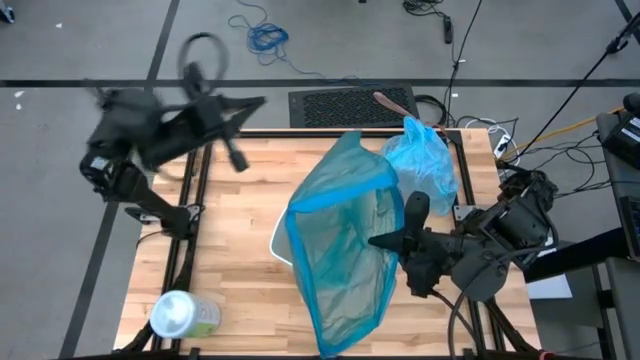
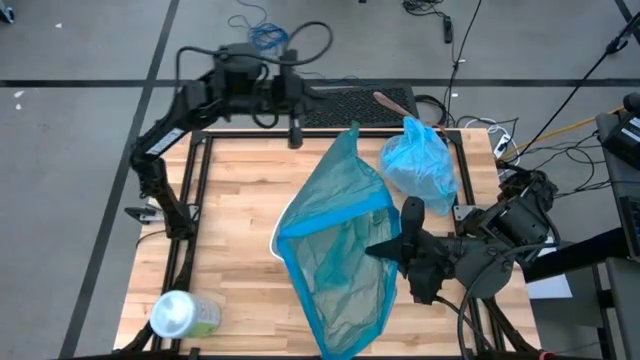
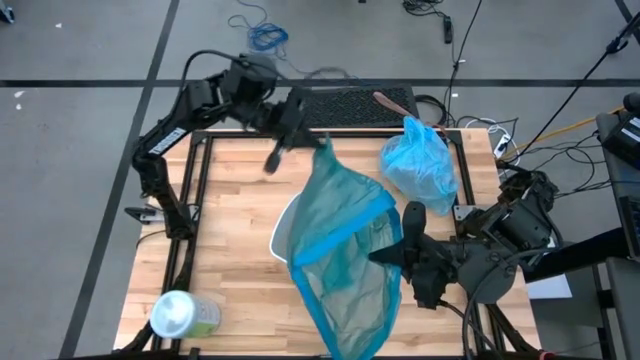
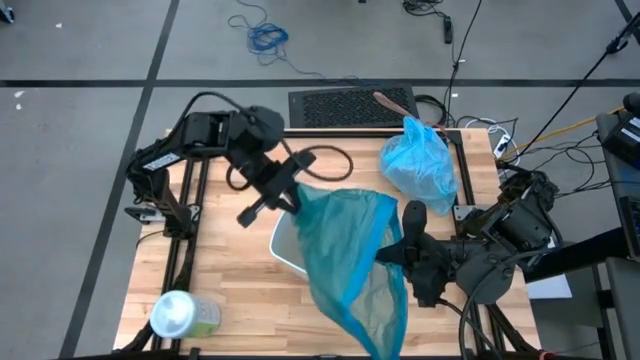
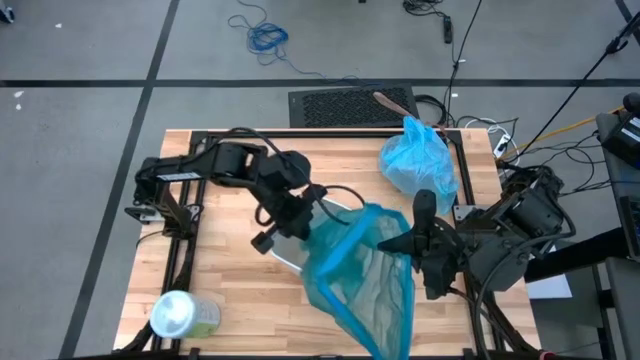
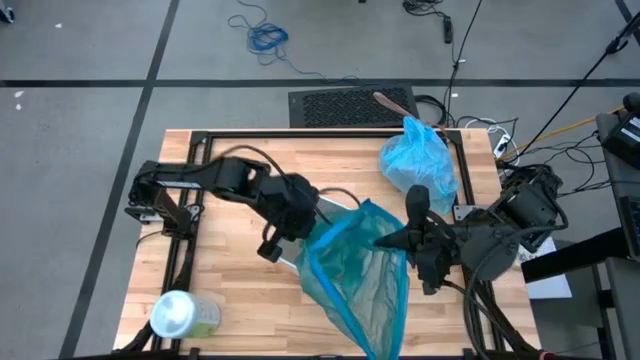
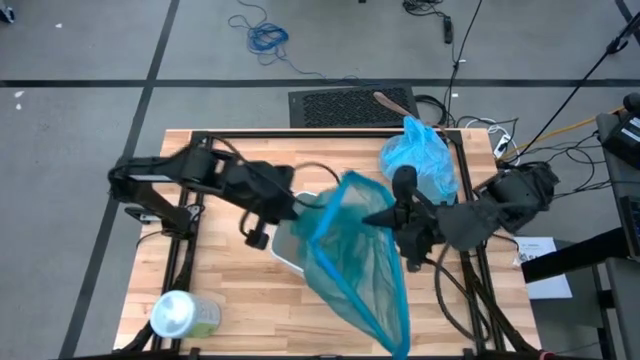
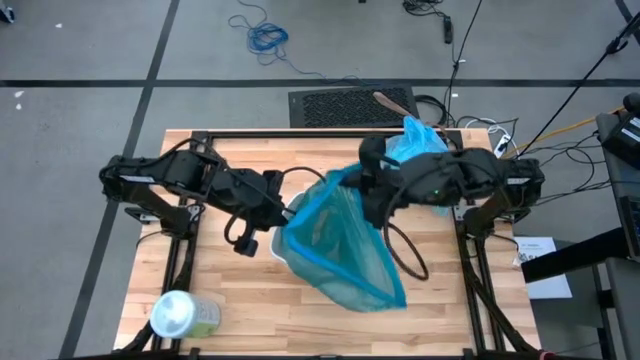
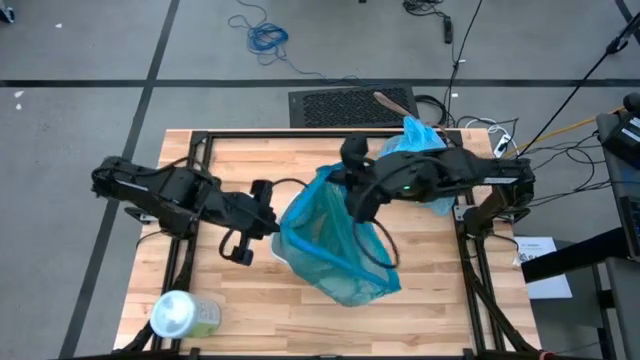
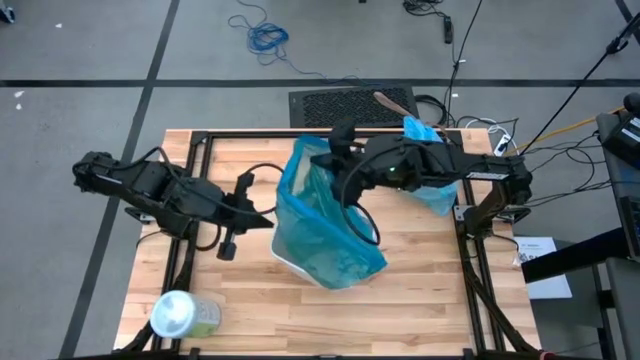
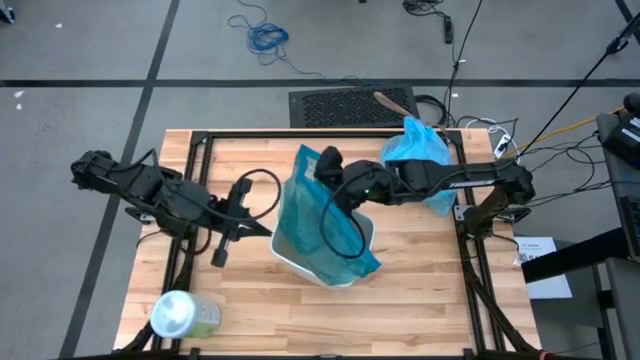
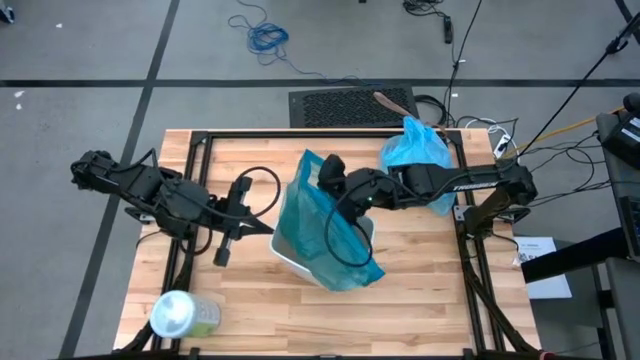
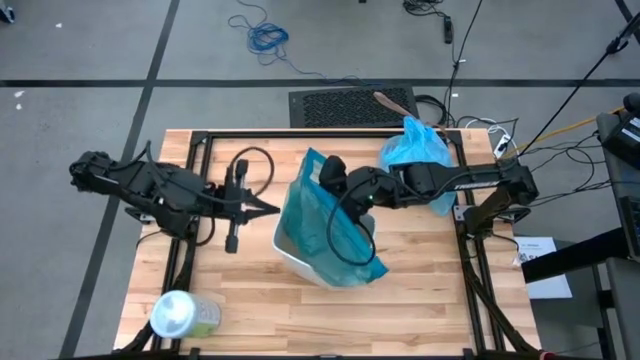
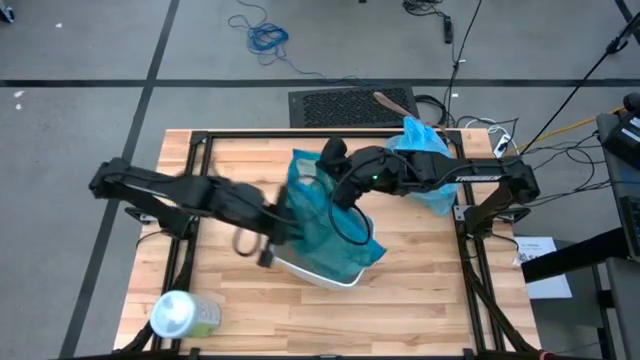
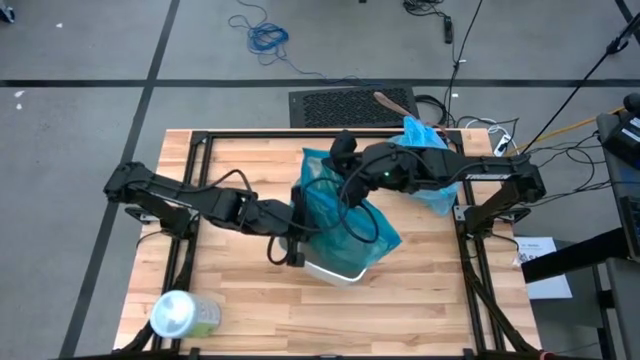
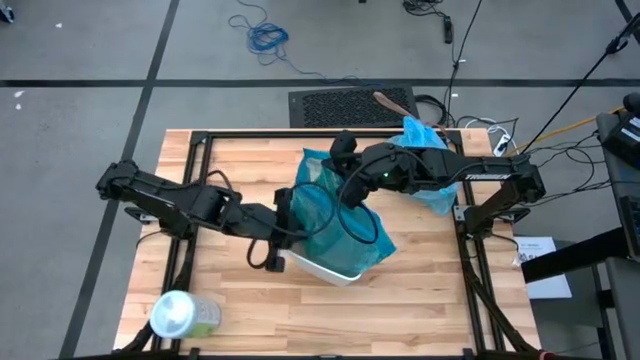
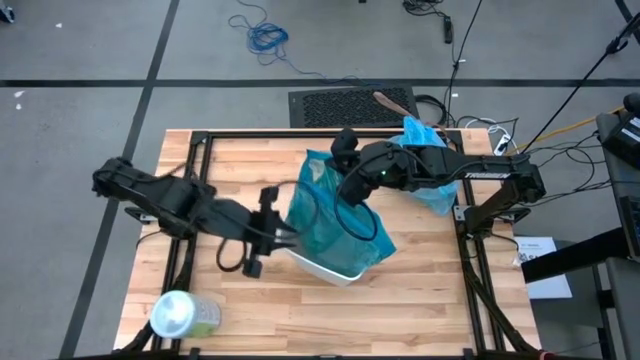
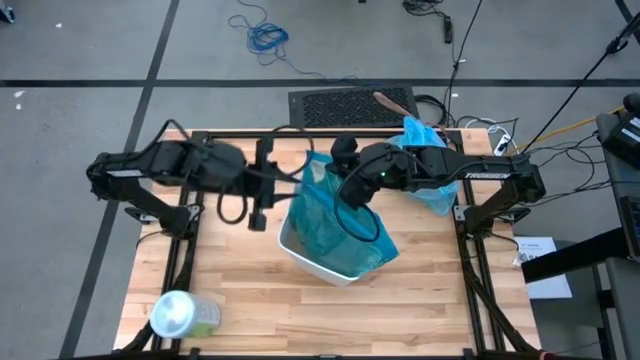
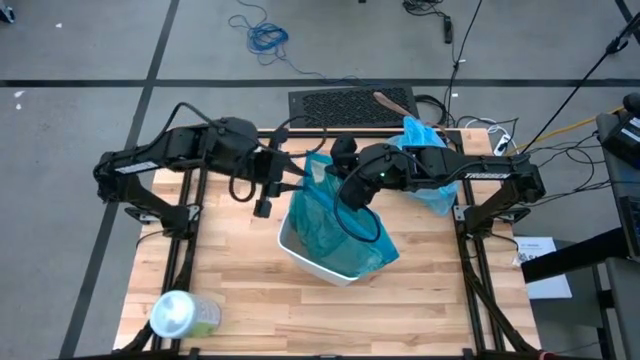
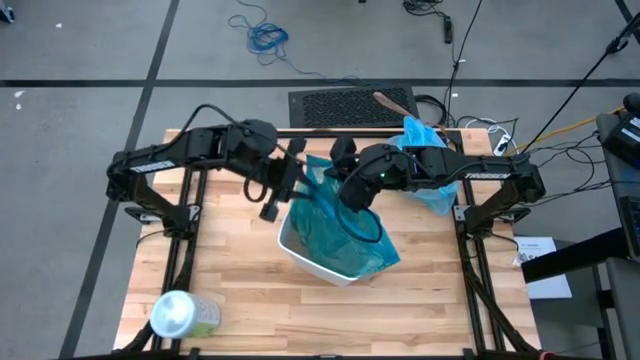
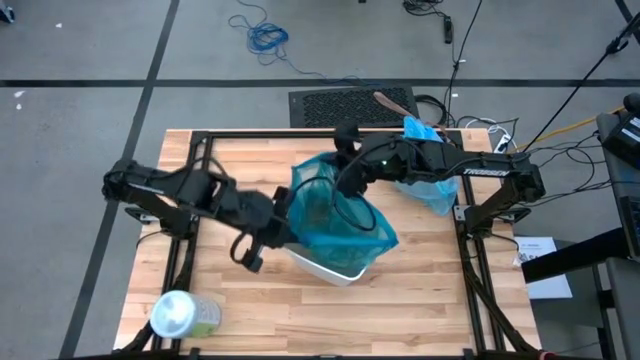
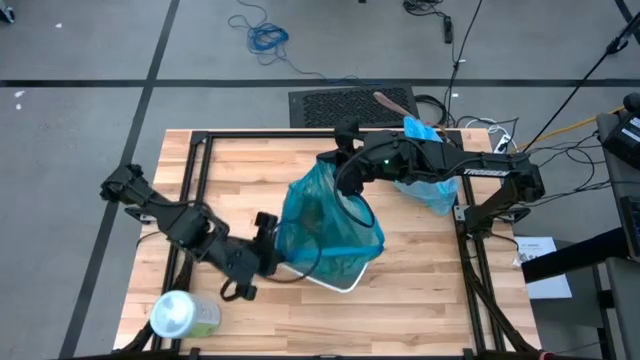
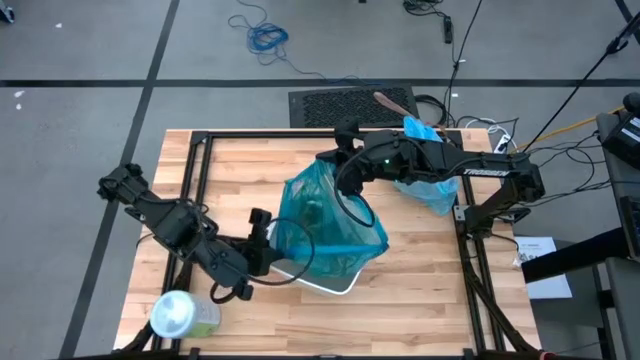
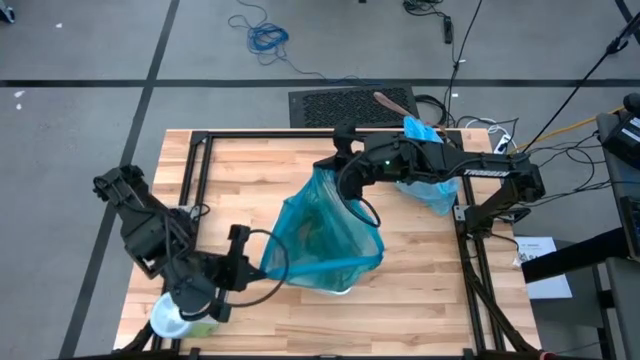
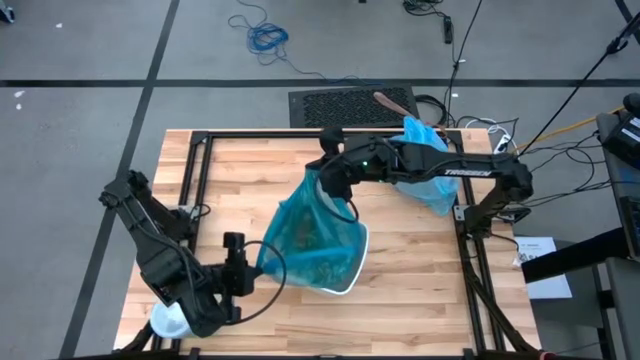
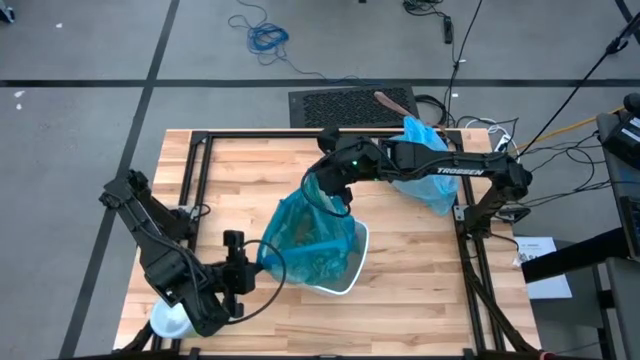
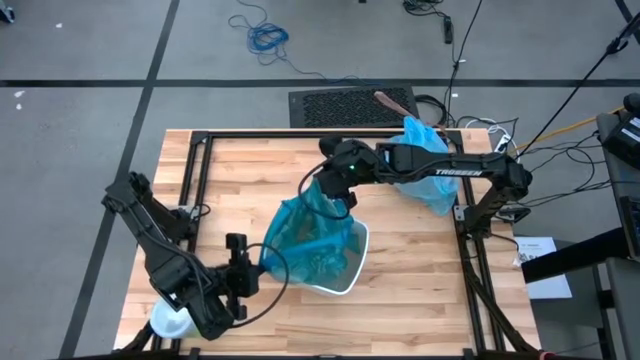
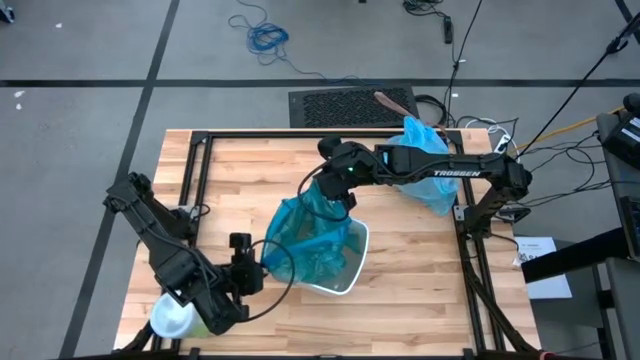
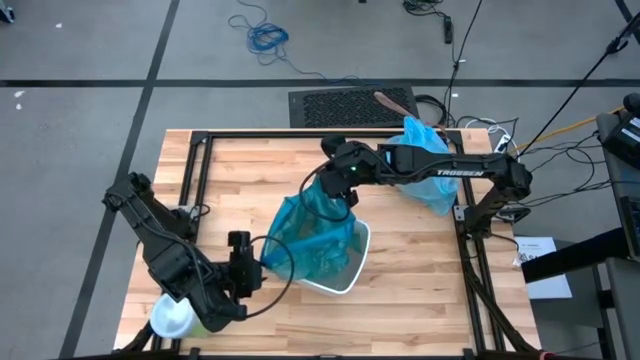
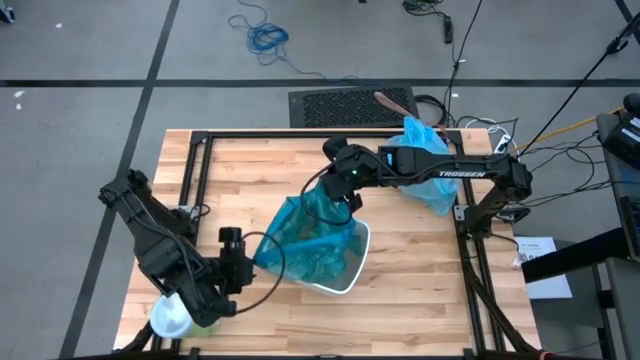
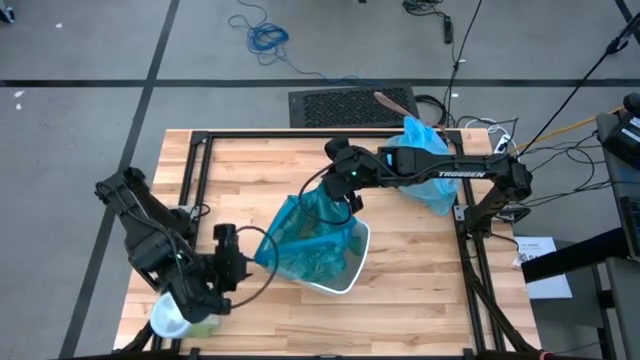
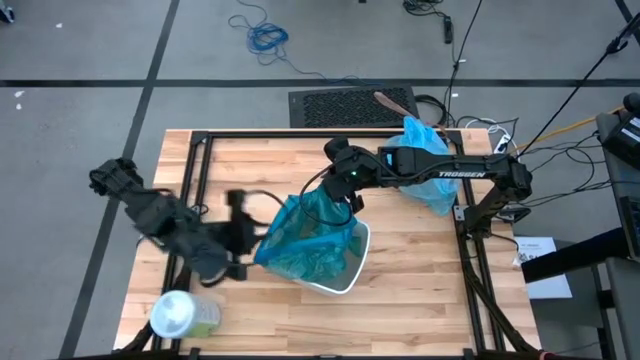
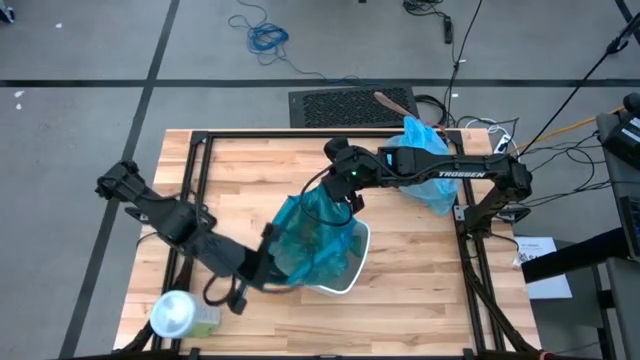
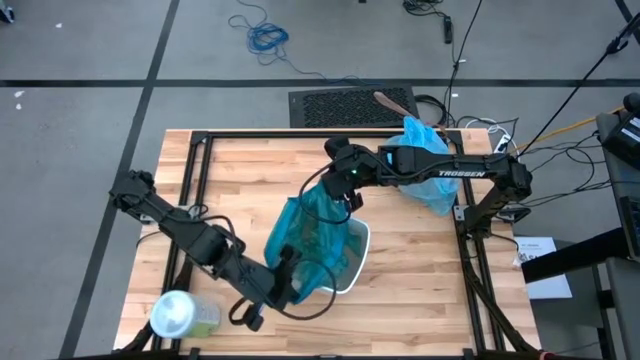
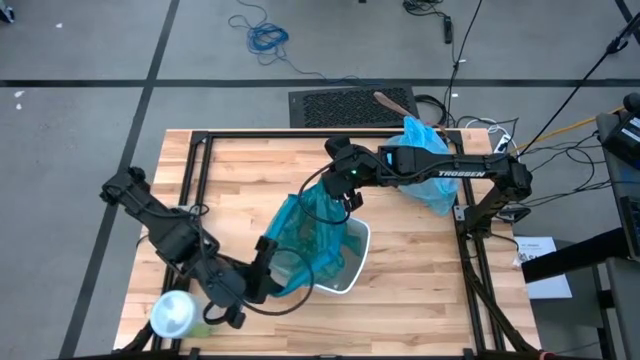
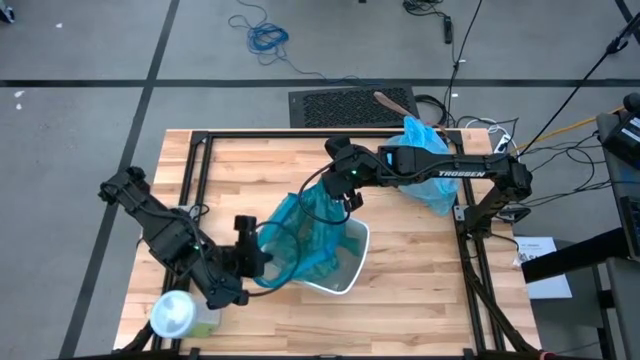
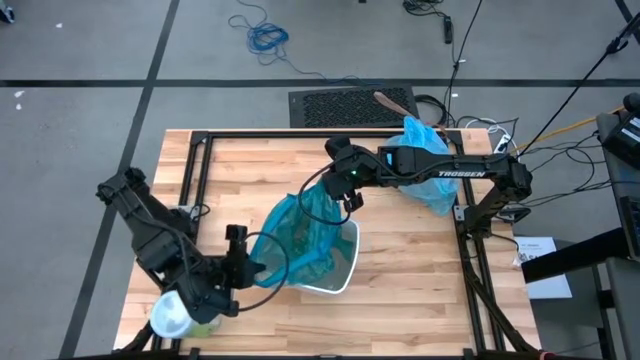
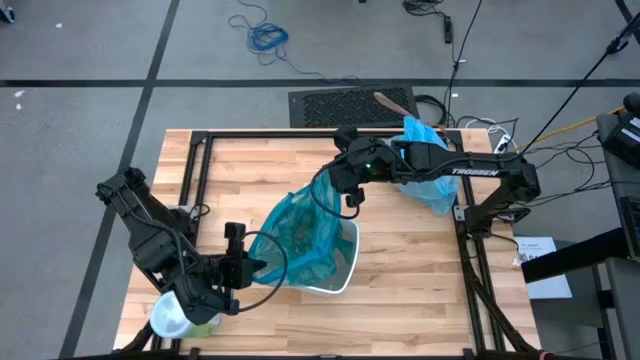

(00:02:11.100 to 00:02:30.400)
Task: place trash/remove bag and relplace
Insert the blue trash bag into the trash bin

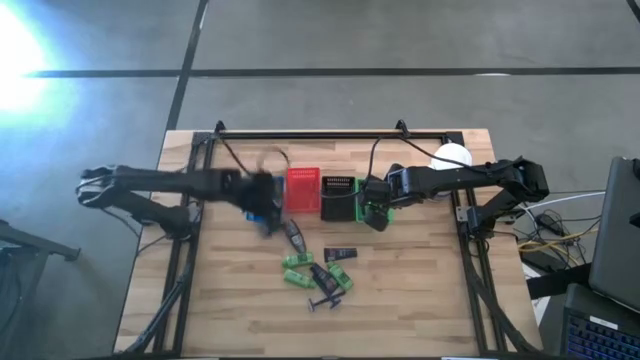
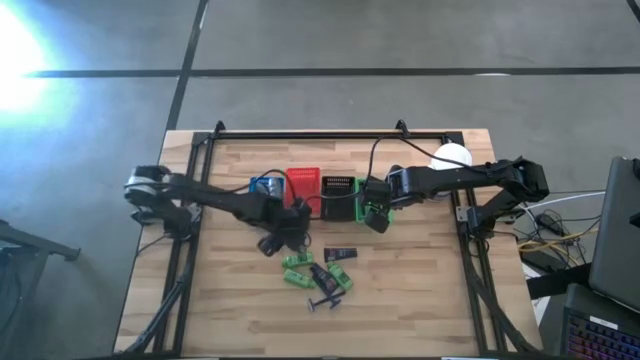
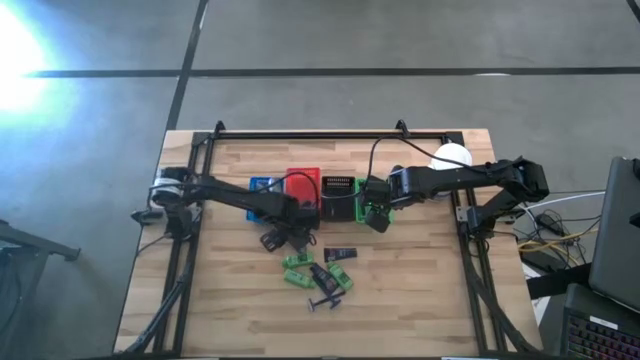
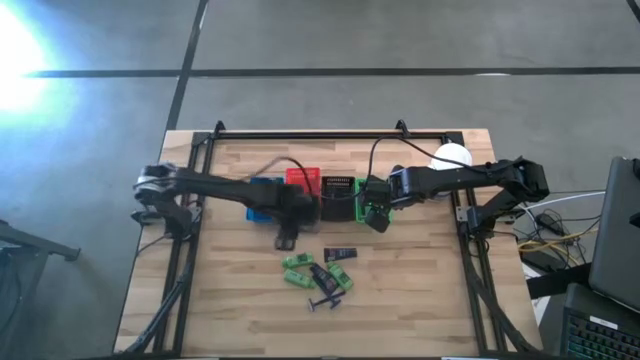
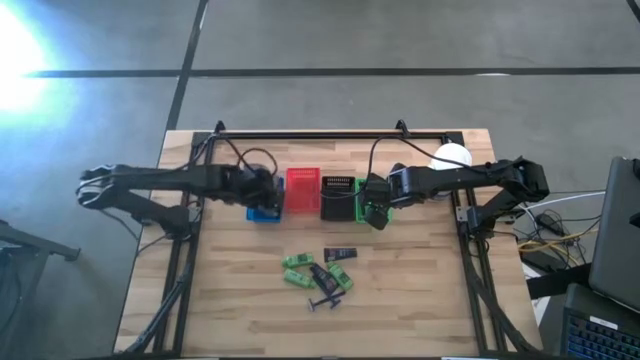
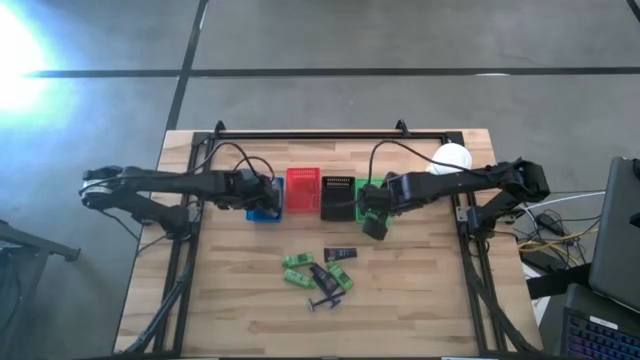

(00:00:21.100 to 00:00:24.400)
Task: Pick & Place Travel size toiletries
Put the gray deodorant into the blue bin
